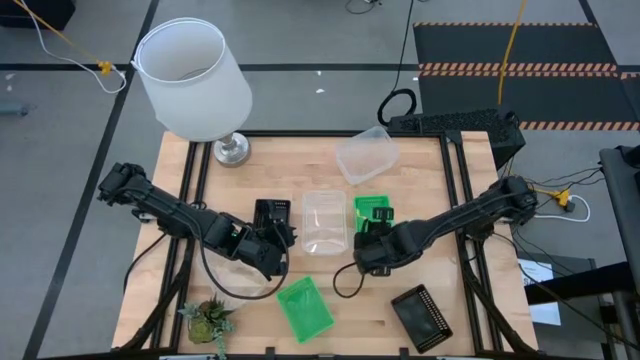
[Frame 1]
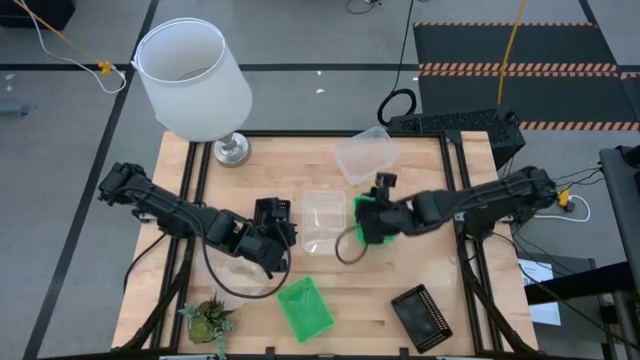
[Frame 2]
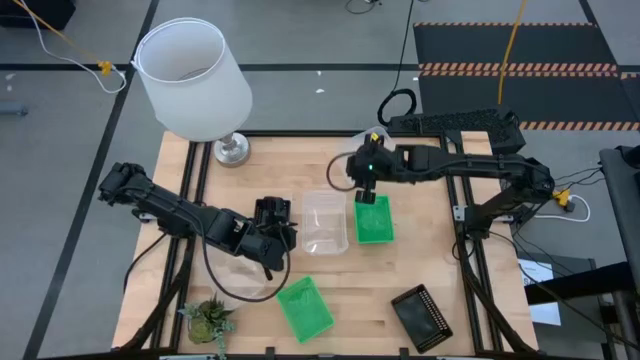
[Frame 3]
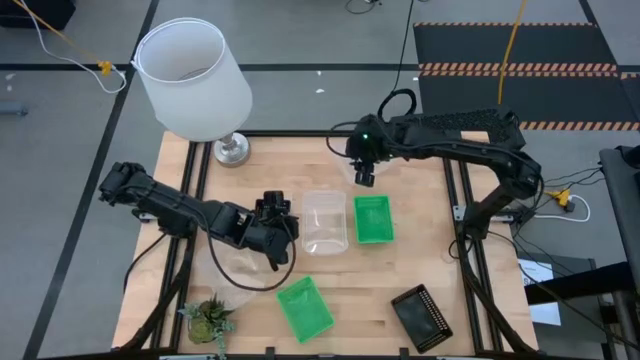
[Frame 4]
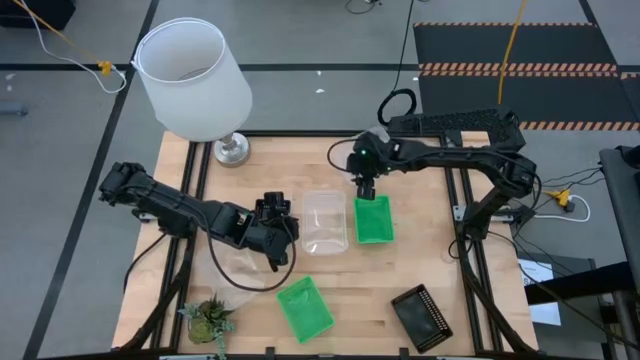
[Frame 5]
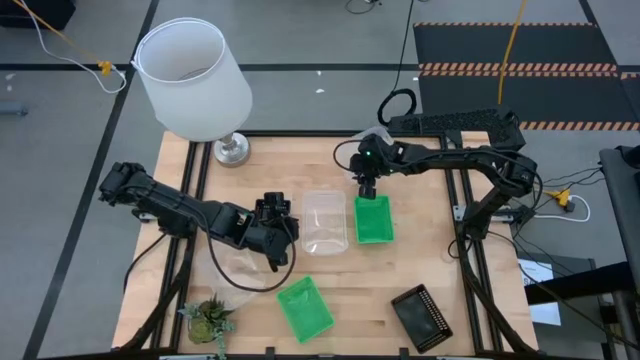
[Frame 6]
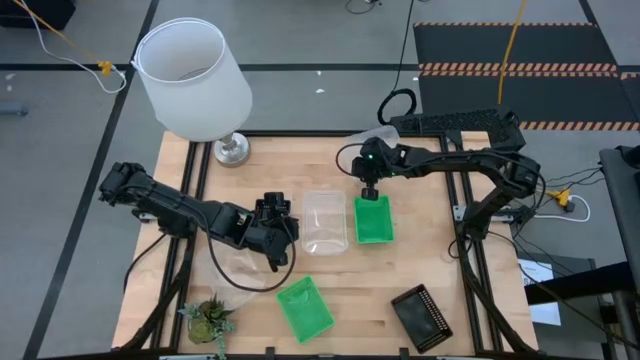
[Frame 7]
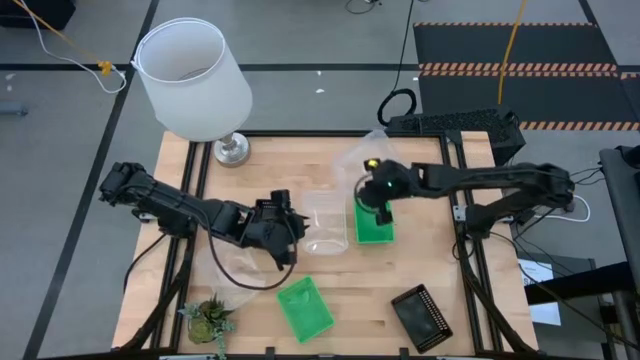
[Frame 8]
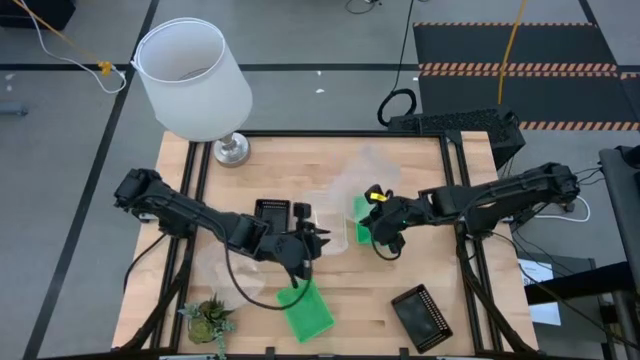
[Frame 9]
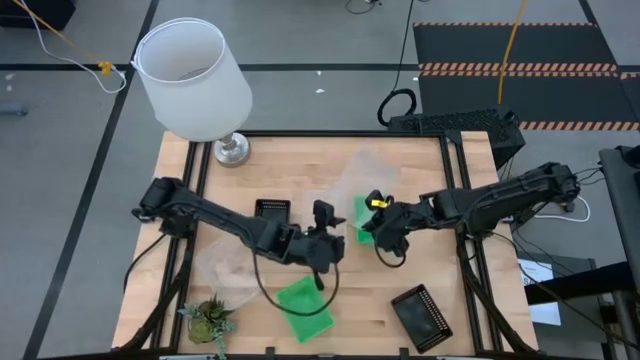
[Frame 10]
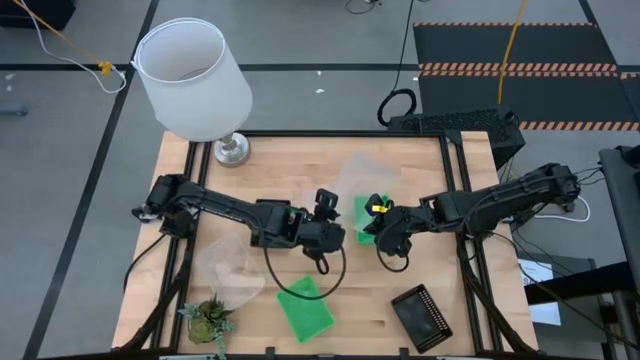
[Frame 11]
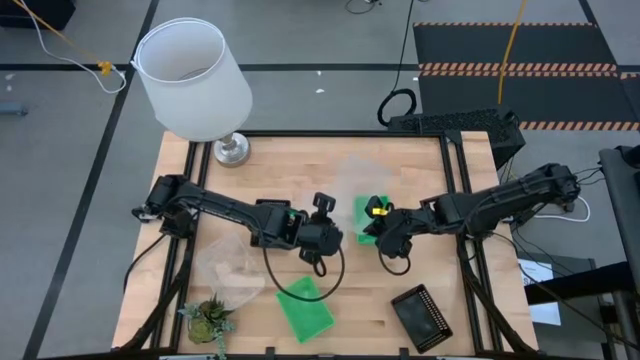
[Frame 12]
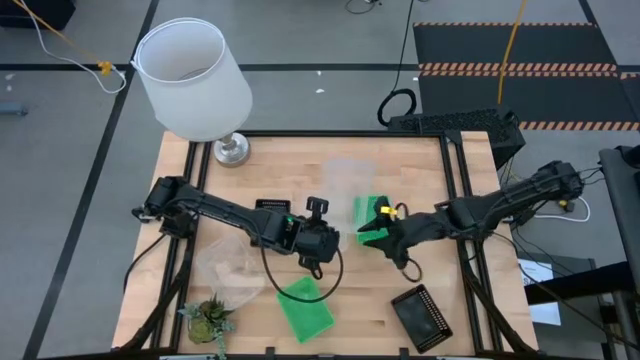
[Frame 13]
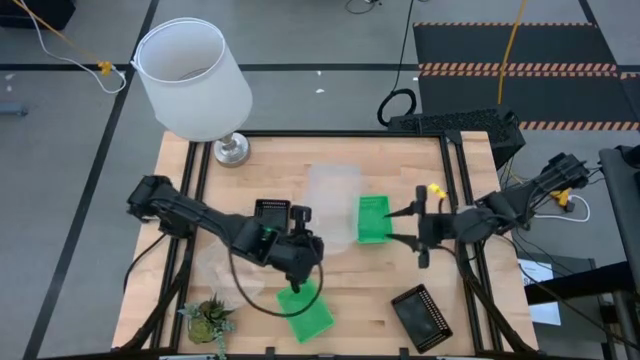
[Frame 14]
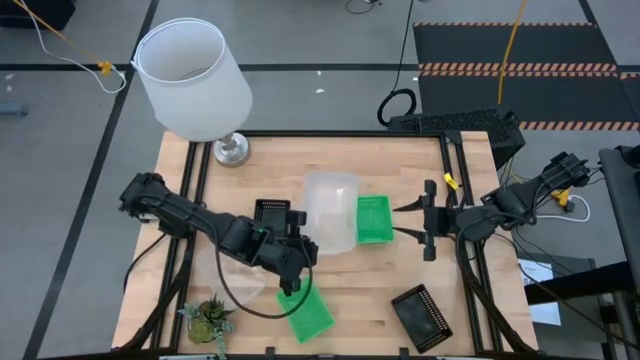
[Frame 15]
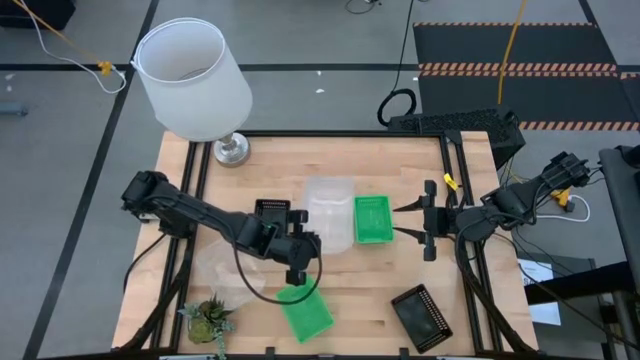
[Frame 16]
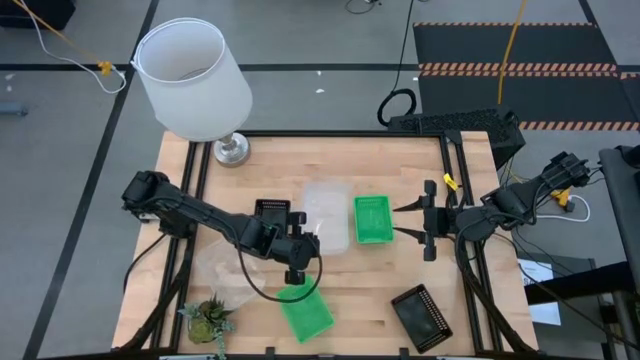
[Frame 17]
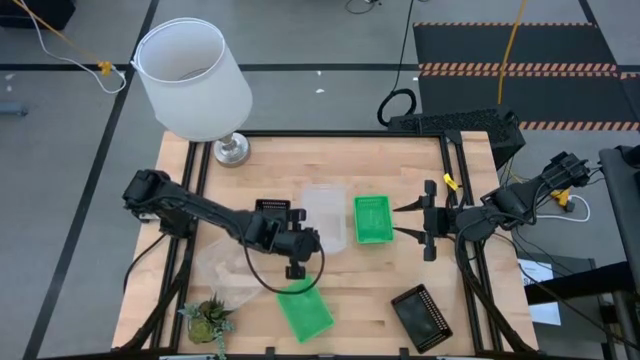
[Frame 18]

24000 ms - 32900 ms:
Stack the top right transparent bin on the middle transparent bin

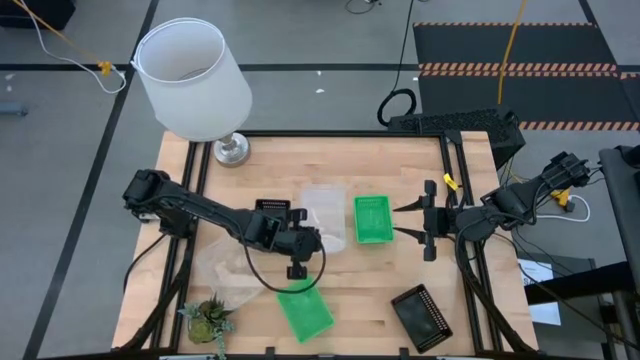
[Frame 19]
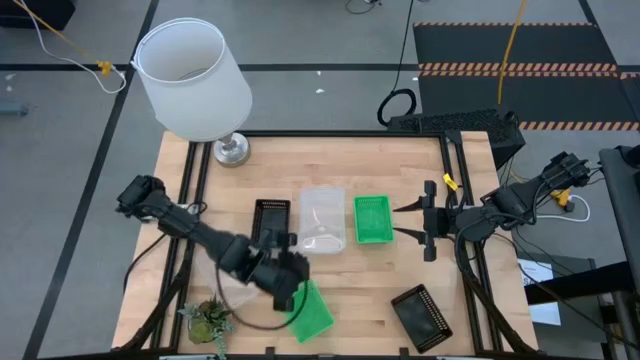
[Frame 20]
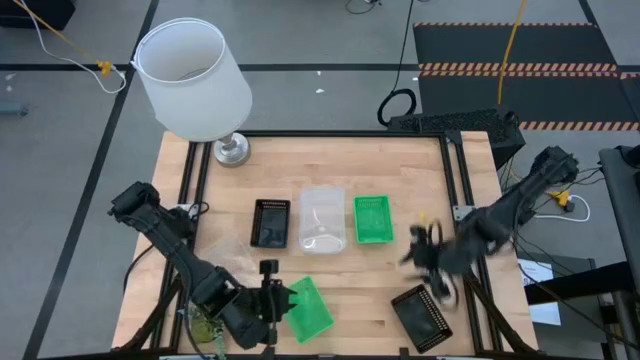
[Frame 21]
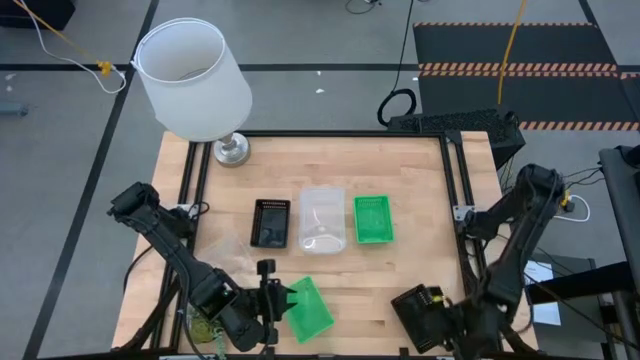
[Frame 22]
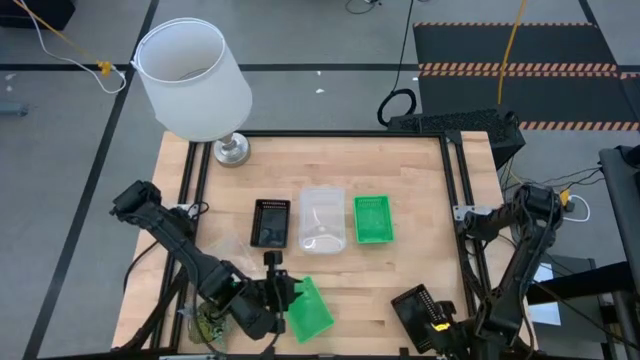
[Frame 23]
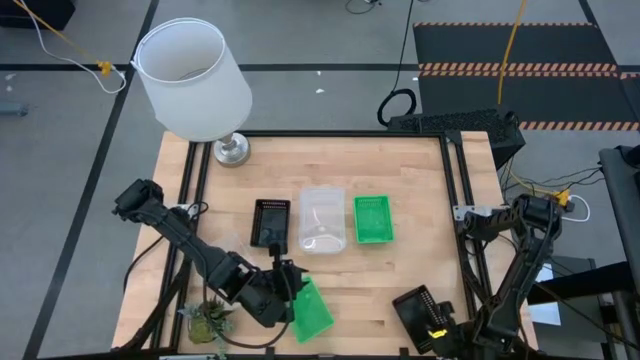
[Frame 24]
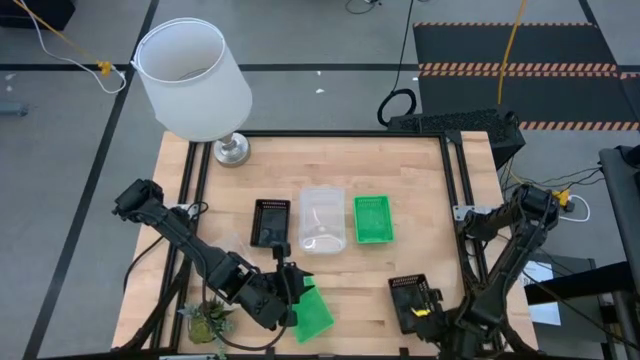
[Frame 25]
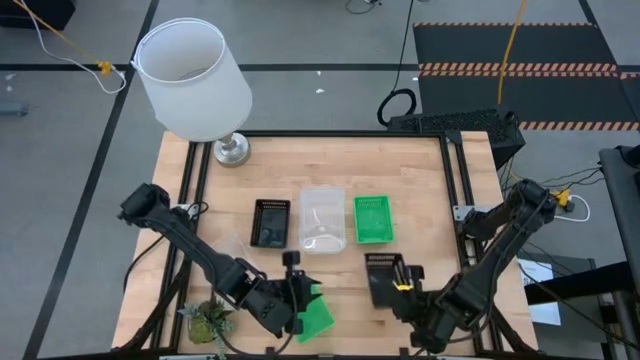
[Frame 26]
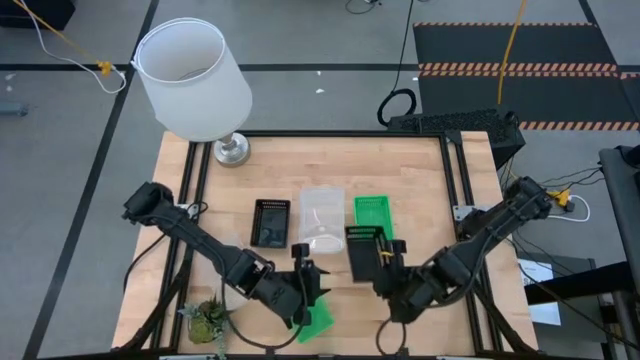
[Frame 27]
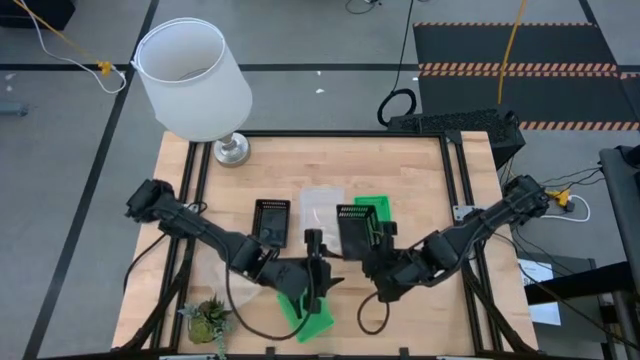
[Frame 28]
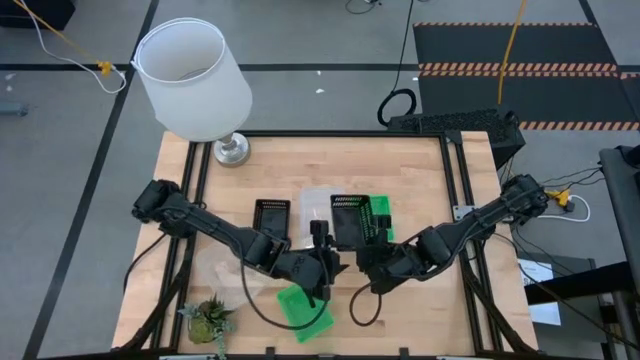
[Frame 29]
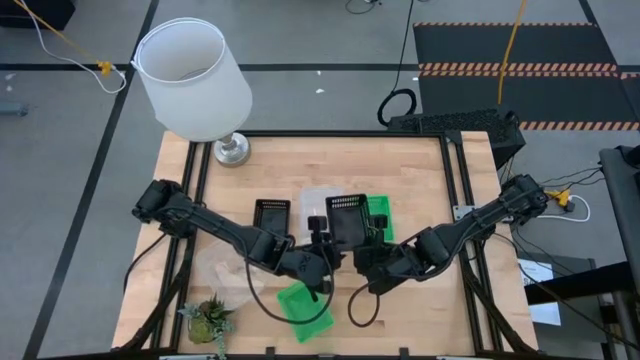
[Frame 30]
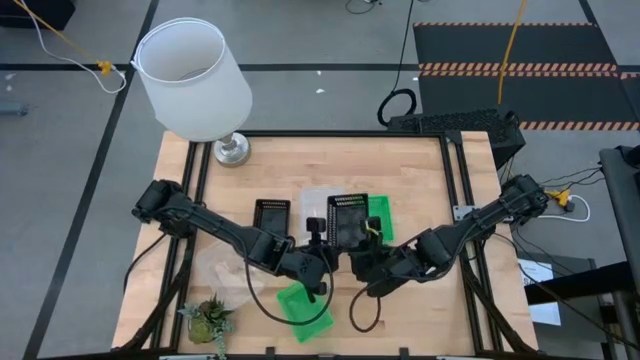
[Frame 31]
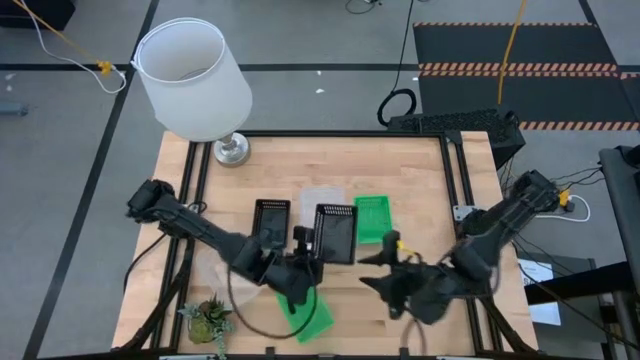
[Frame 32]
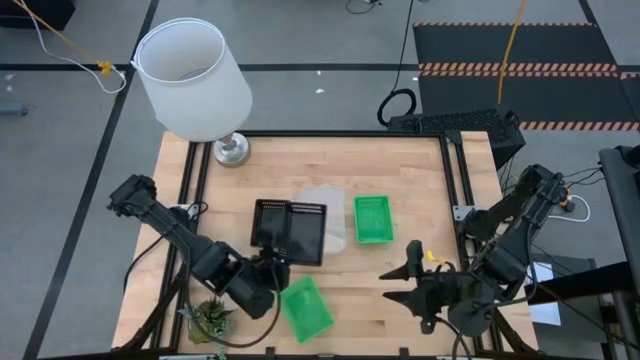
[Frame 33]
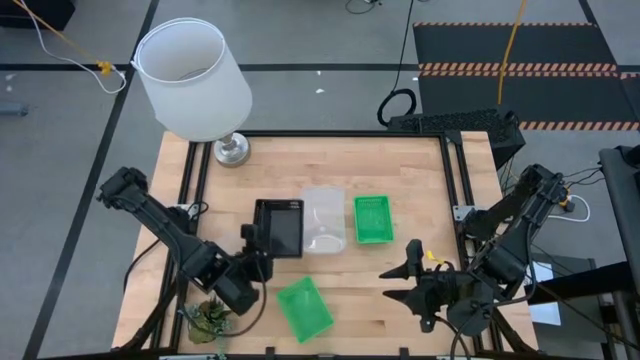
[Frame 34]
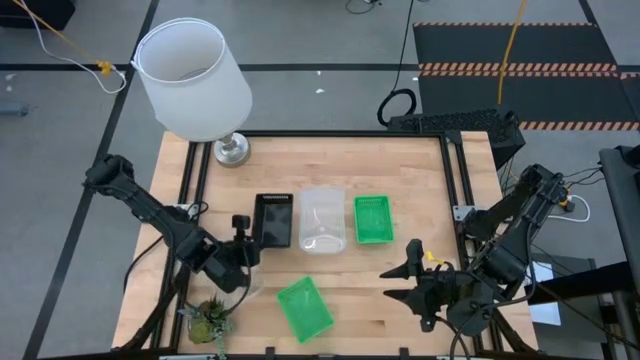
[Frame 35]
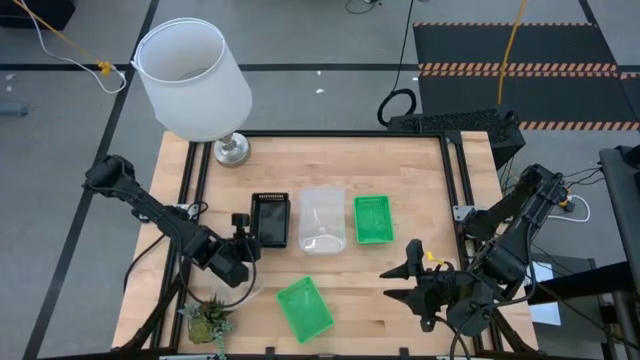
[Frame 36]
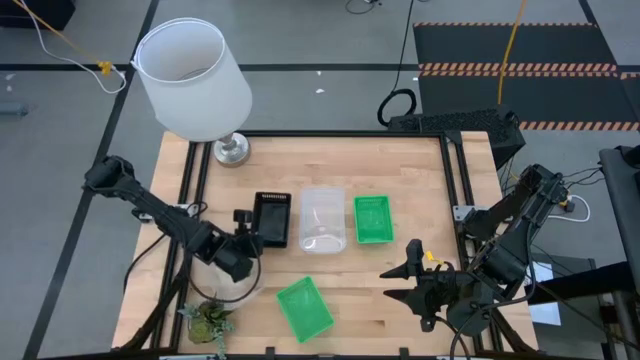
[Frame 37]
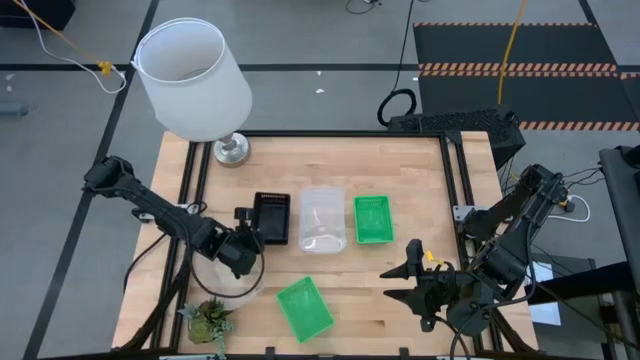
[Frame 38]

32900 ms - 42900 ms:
Stack the bottom black bin on the black bins
